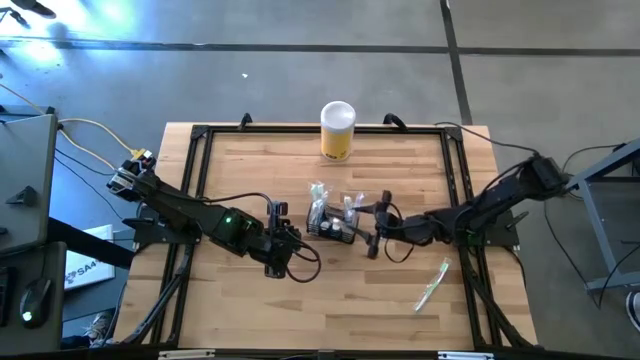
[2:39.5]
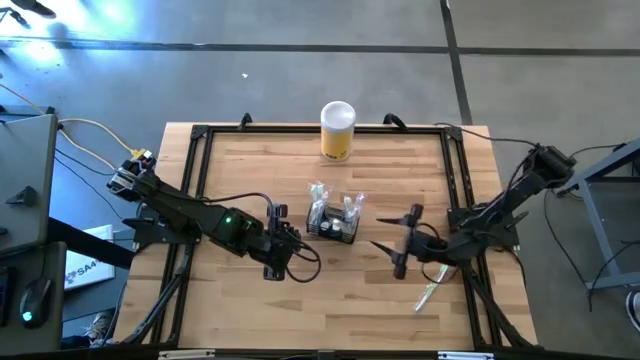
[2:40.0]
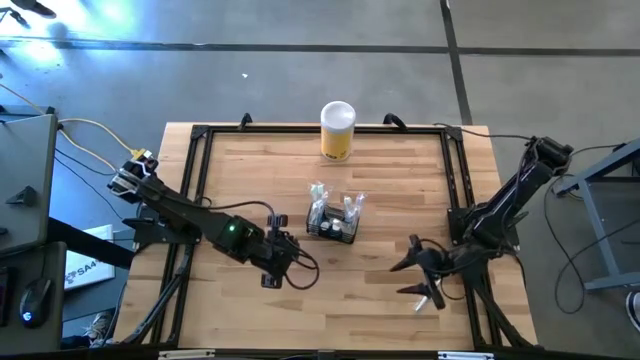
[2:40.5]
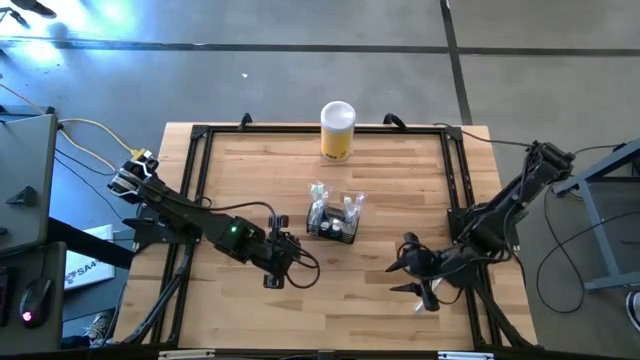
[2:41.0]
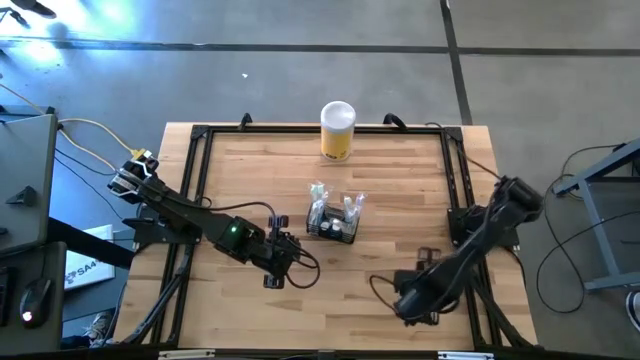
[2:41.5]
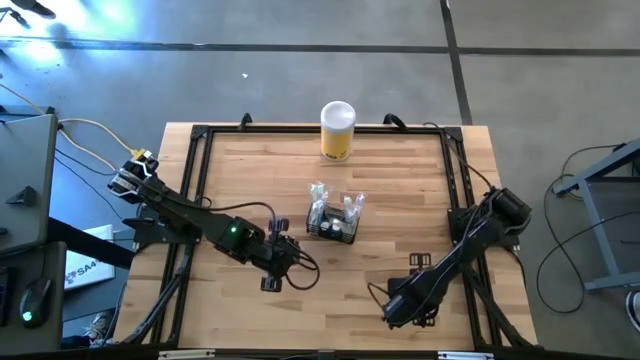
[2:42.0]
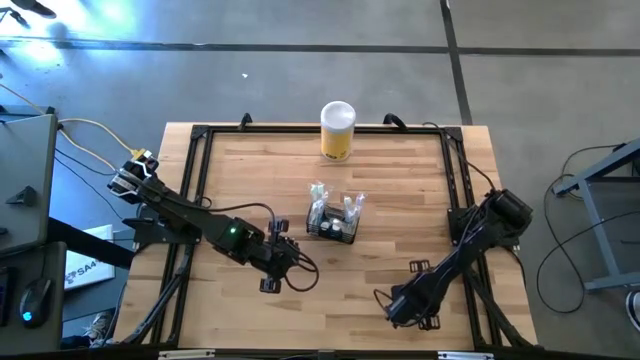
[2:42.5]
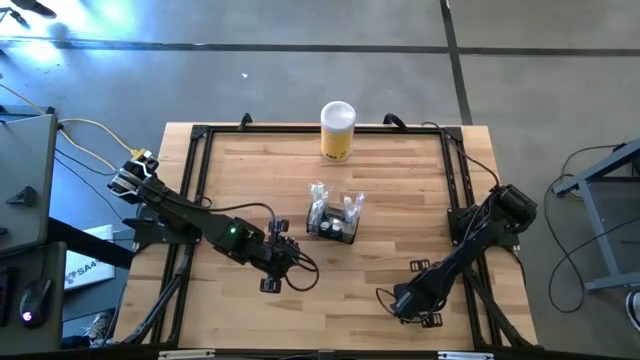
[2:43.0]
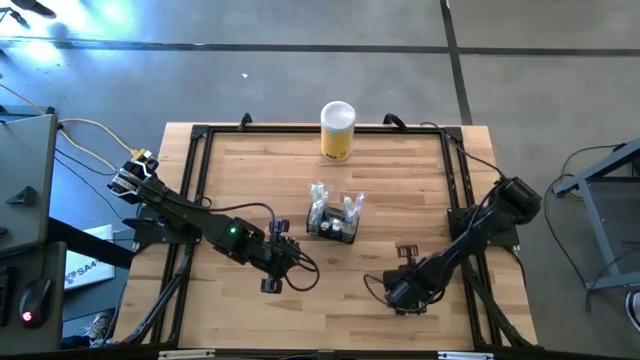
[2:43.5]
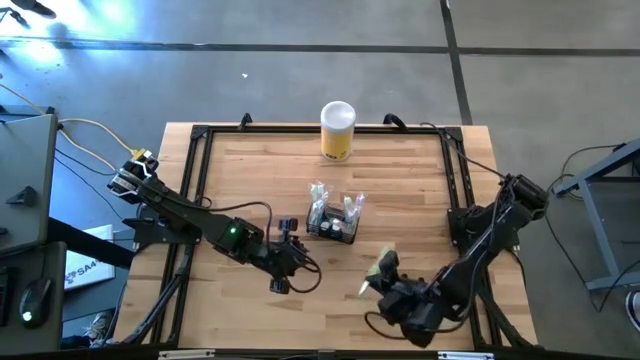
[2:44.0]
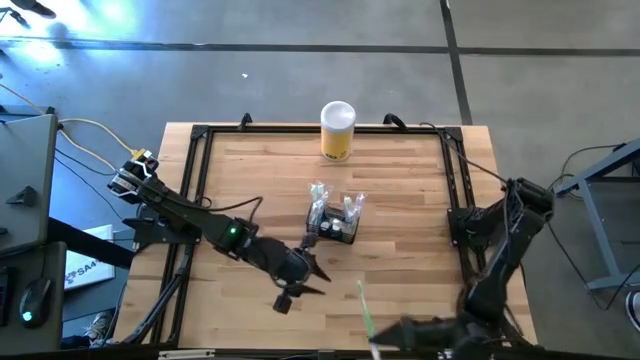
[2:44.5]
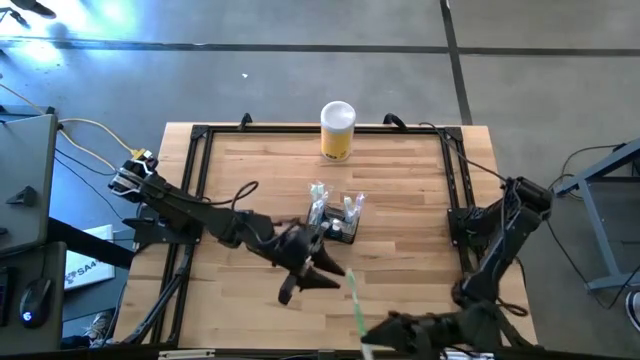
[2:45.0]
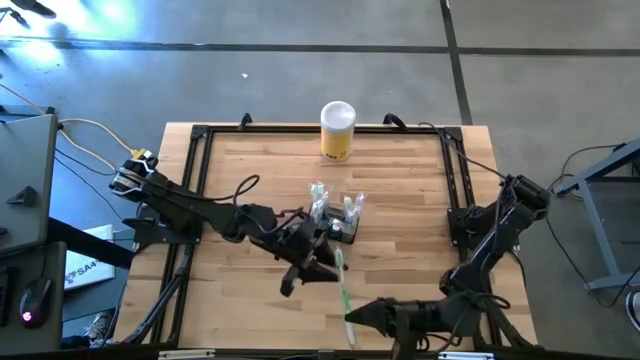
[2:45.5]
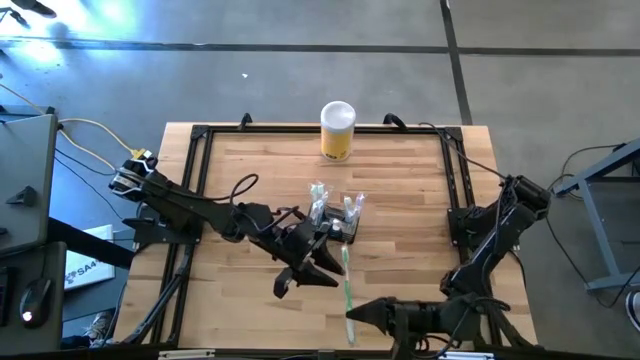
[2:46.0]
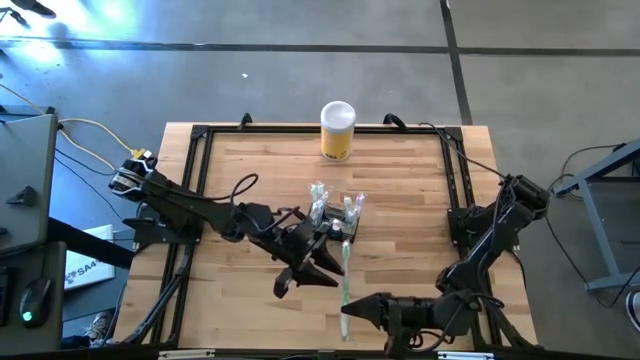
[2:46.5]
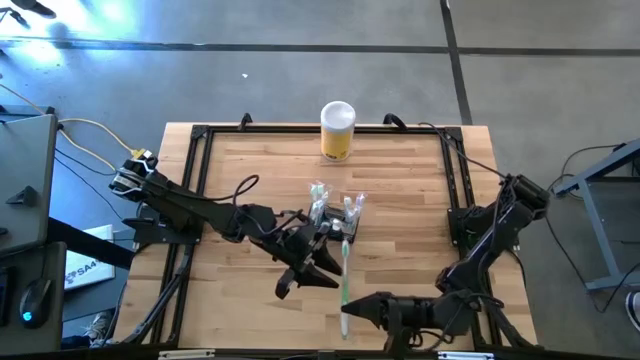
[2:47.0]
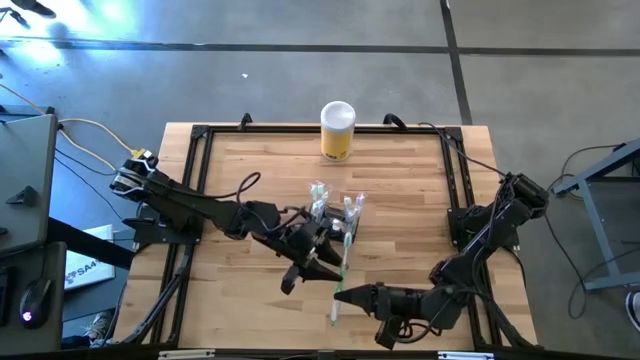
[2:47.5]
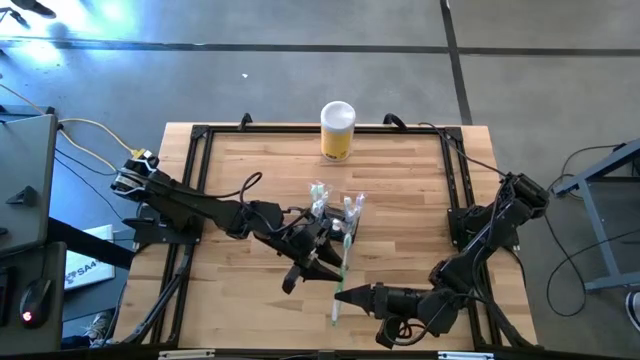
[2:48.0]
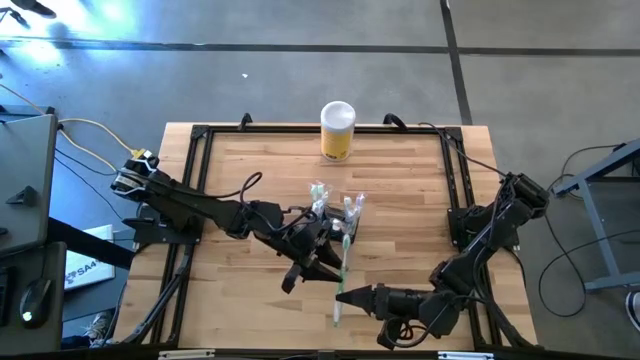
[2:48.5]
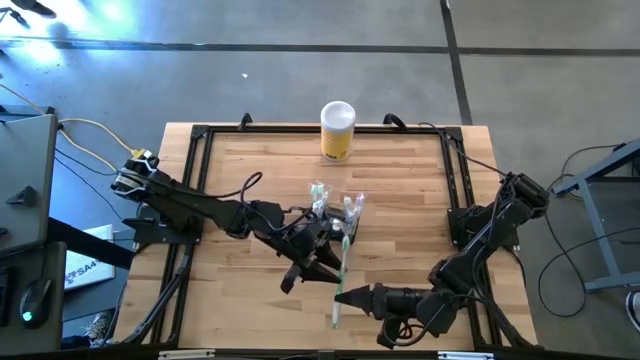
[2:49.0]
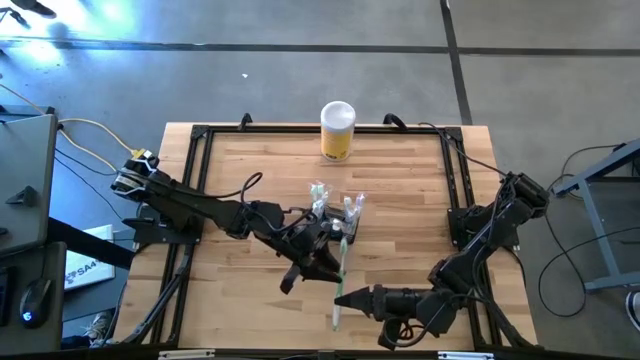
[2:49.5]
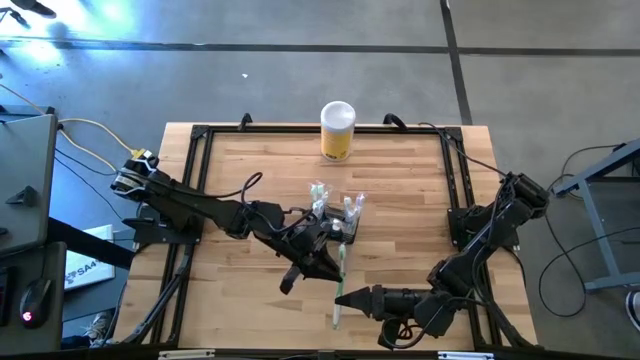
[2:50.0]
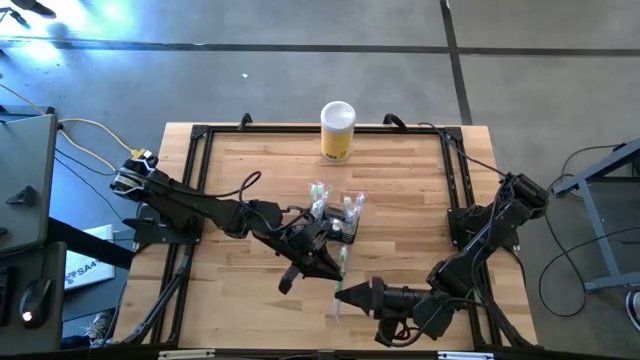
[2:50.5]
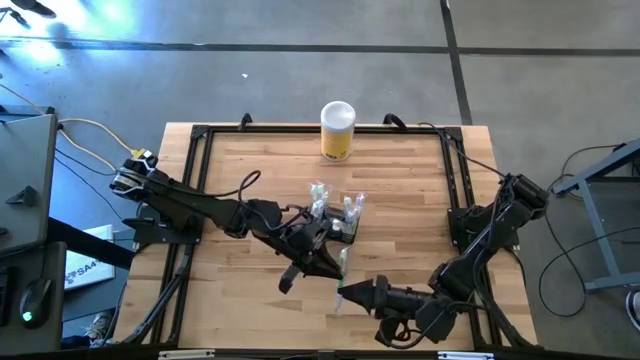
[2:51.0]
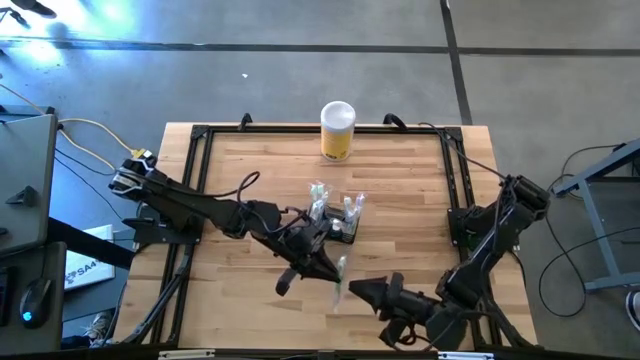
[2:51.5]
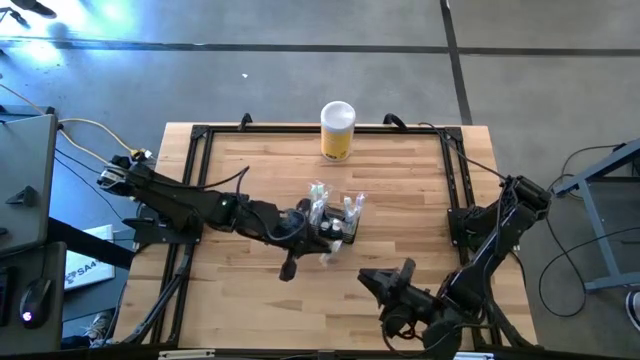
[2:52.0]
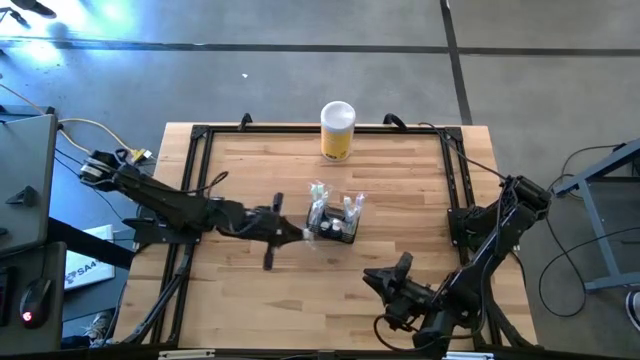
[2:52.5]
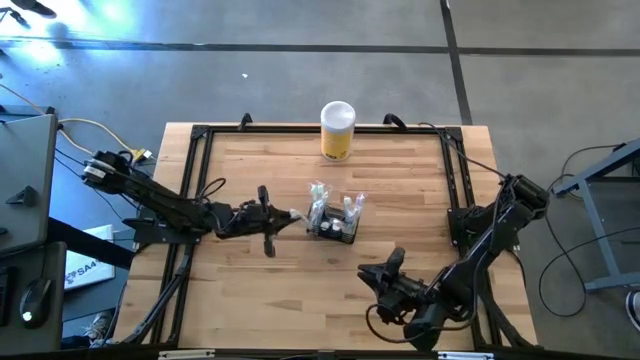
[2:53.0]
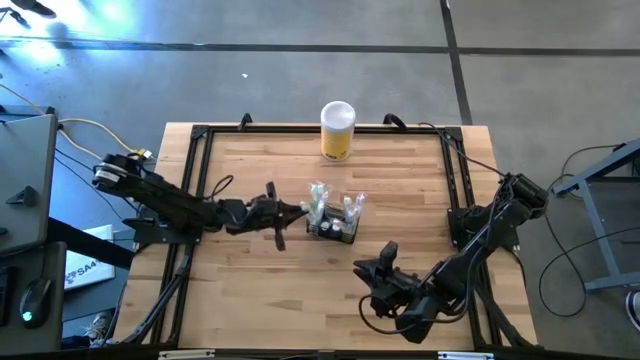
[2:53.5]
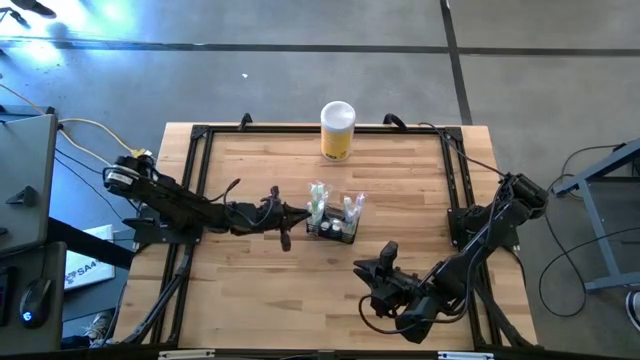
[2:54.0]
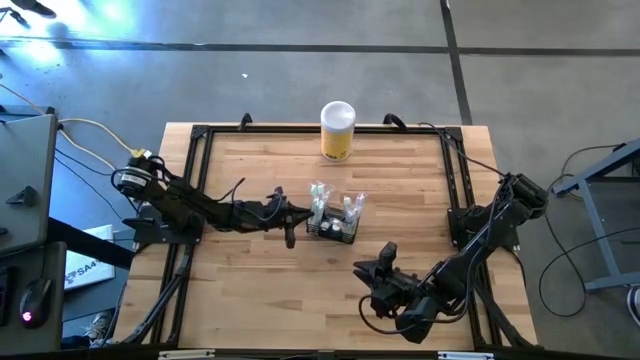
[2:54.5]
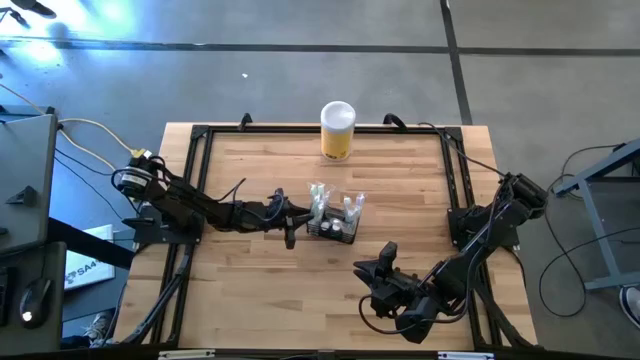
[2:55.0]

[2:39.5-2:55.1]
Task: Pick & Place toothbrushing station
Put the green toothbrush into the wire organizer

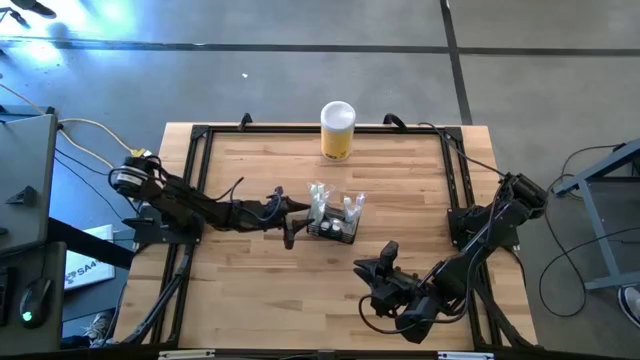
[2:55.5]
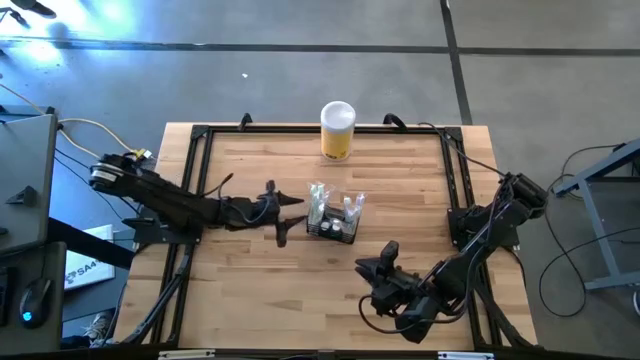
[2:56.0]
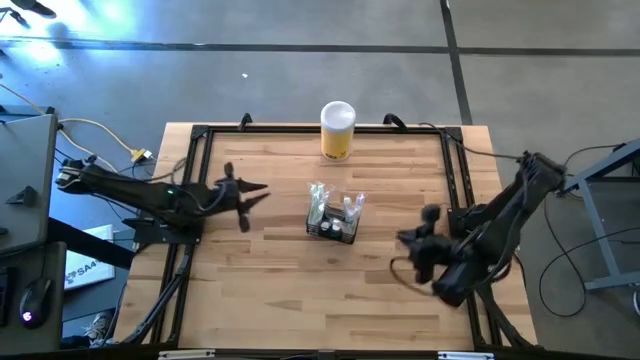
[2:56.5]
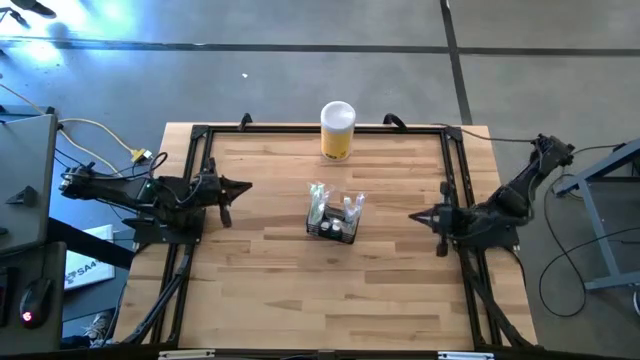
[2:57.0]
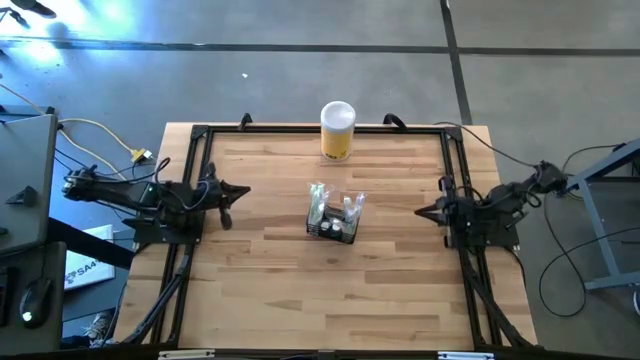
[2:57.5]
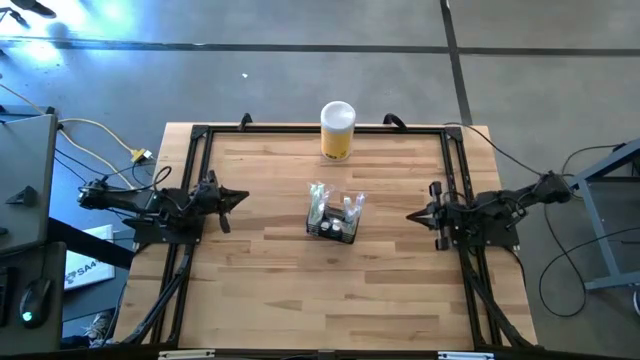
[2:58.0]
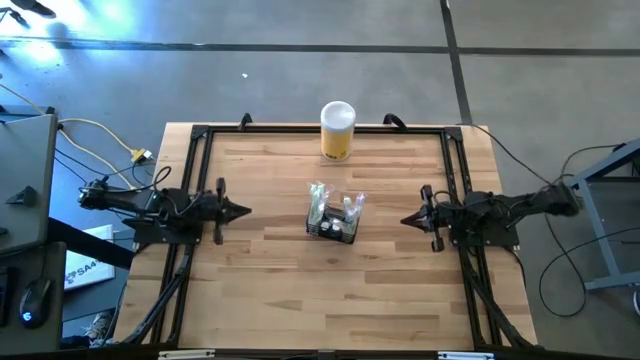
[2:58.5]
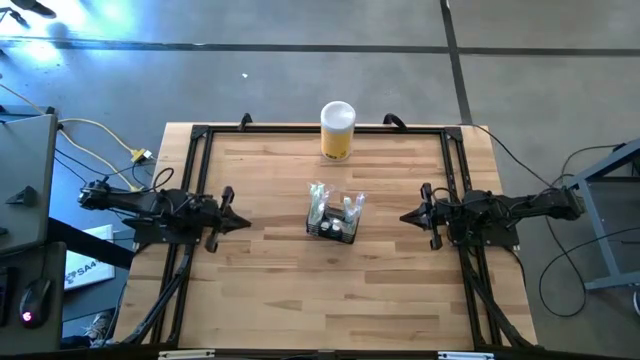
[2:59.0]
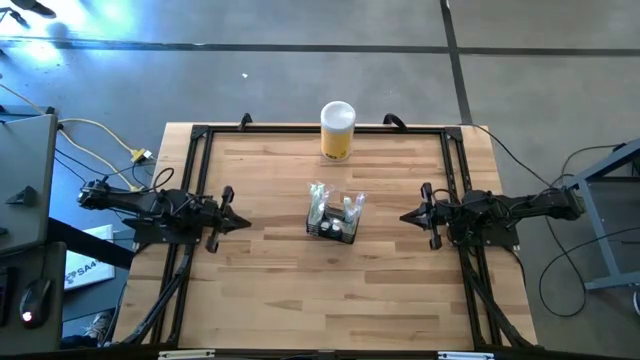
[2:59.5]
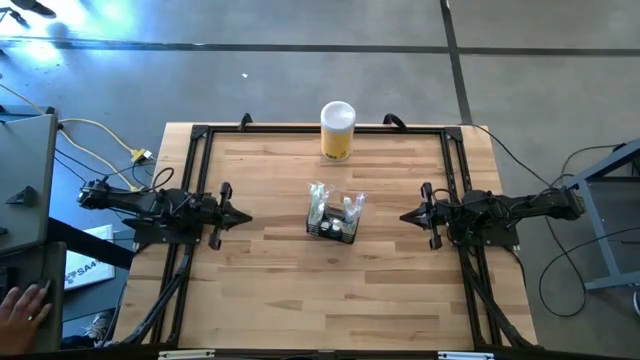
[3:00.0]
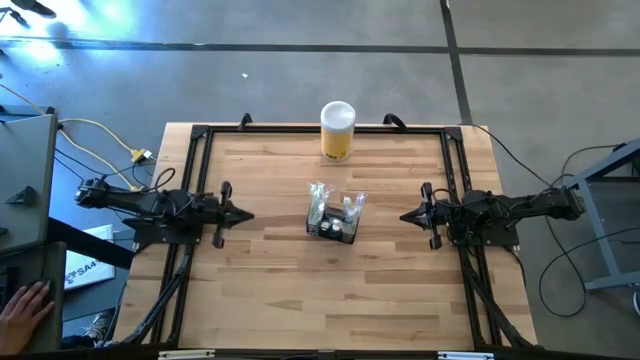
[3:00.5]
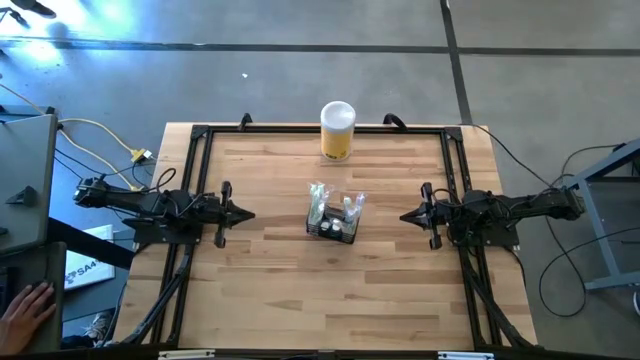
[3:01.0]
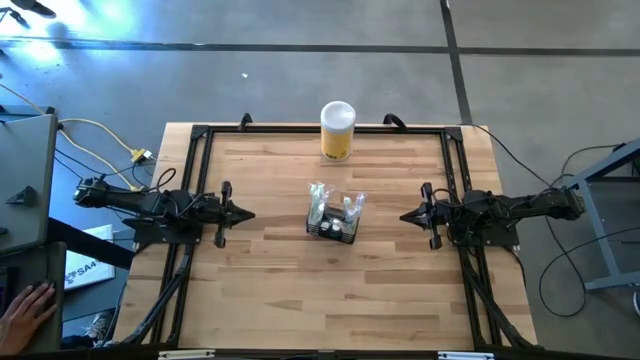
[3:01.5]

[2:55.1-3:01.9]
Return to Home Position

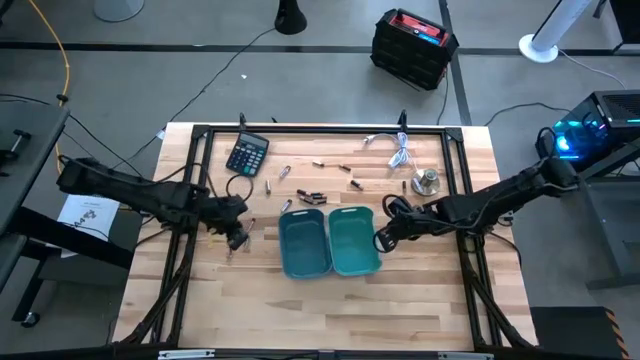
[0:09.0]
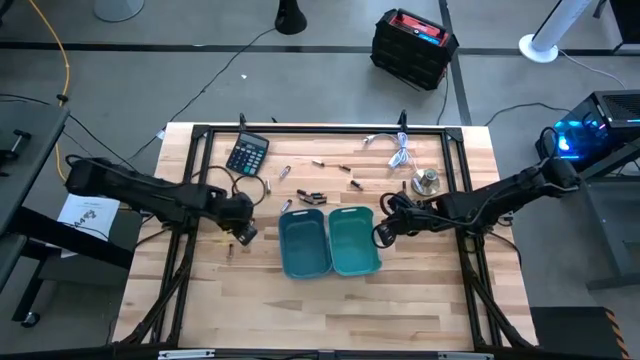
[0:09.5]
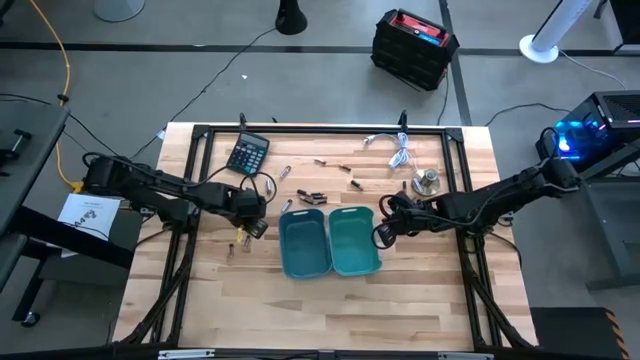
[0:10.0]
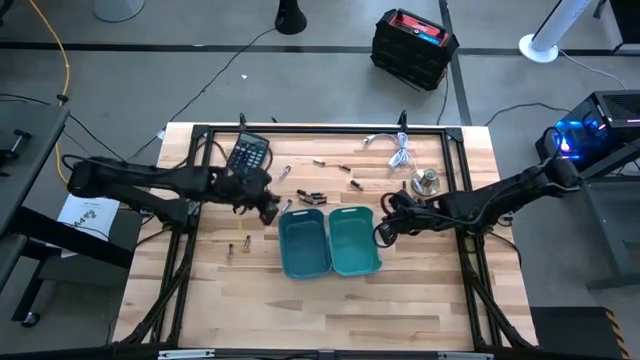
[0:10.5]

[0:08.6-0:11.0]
Task: Sort batteries
Put the silver battery into the blue bin
